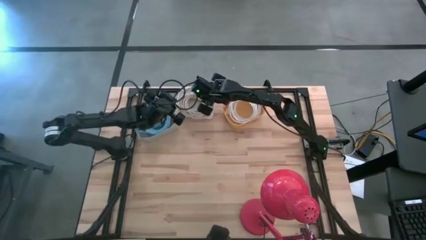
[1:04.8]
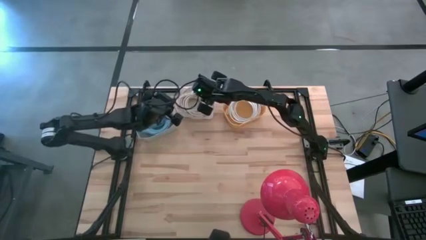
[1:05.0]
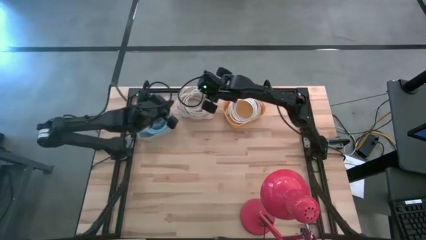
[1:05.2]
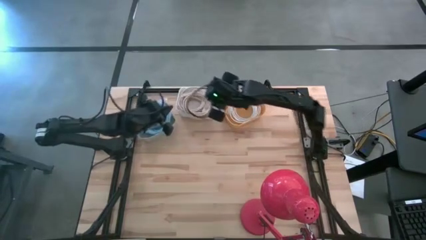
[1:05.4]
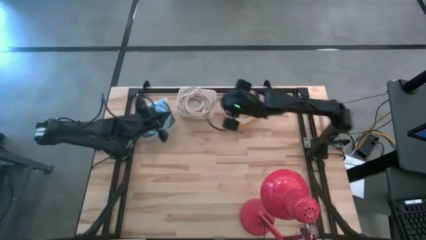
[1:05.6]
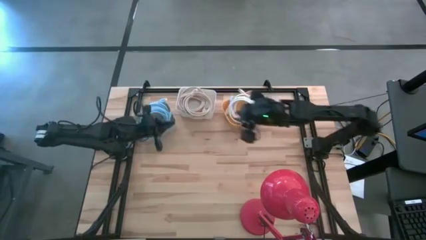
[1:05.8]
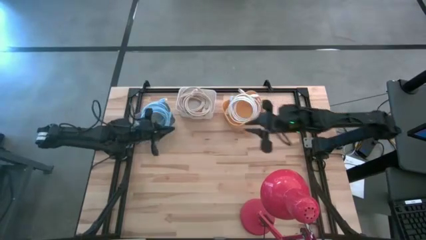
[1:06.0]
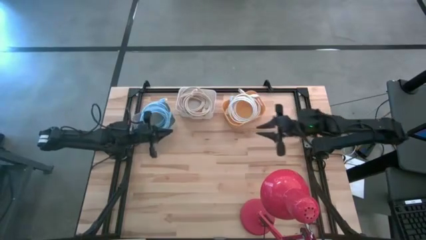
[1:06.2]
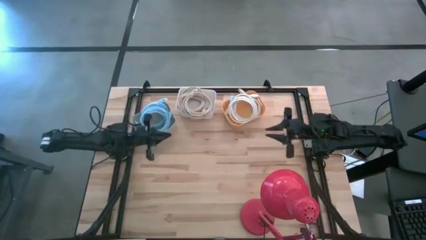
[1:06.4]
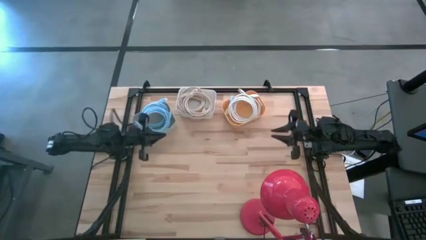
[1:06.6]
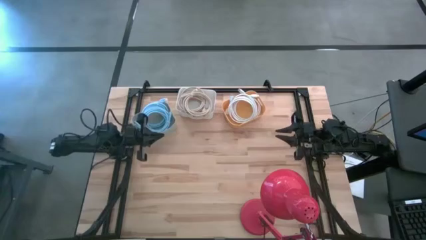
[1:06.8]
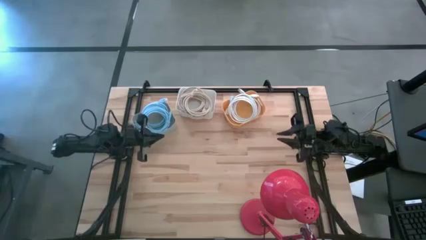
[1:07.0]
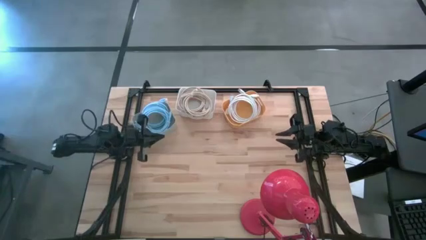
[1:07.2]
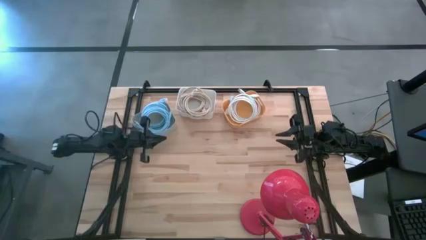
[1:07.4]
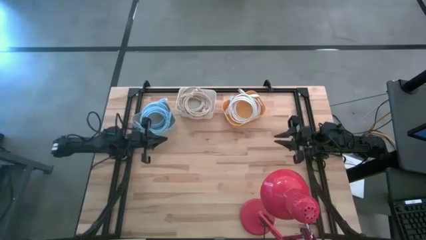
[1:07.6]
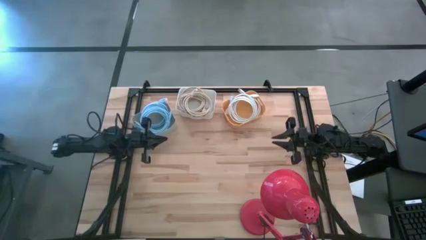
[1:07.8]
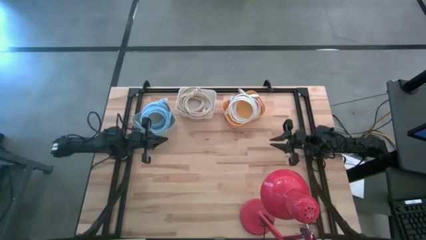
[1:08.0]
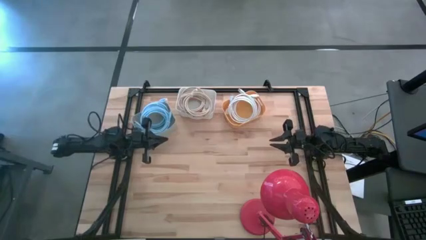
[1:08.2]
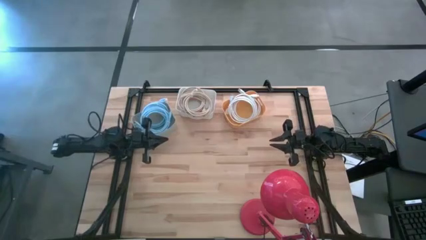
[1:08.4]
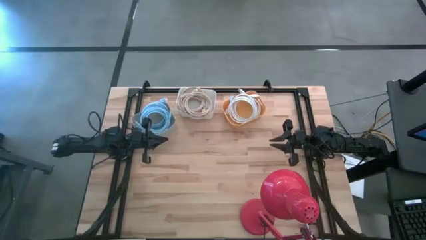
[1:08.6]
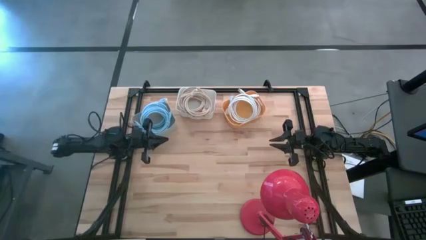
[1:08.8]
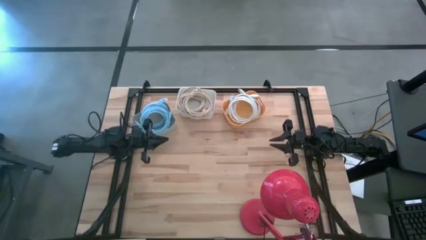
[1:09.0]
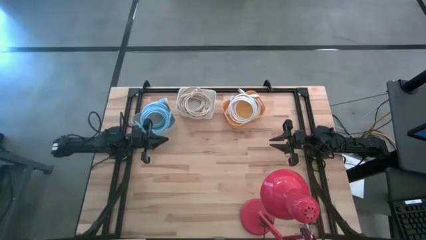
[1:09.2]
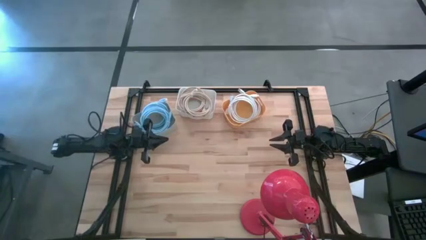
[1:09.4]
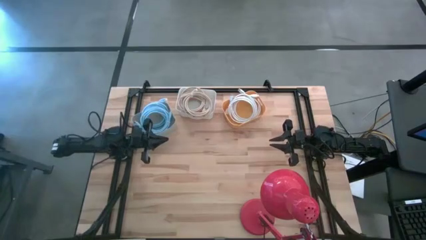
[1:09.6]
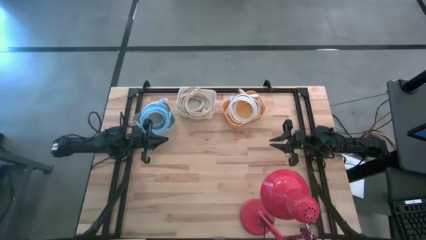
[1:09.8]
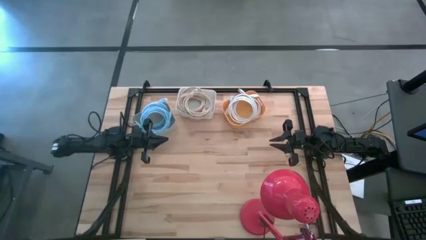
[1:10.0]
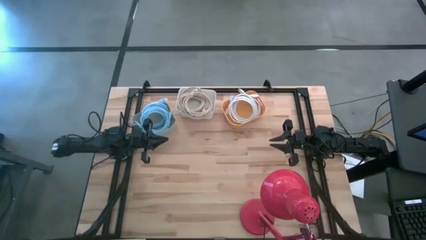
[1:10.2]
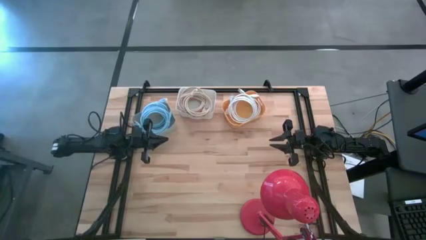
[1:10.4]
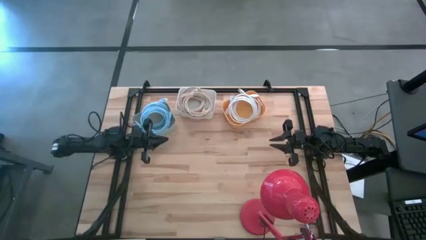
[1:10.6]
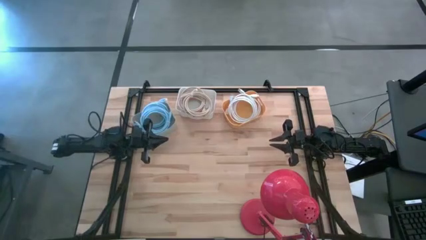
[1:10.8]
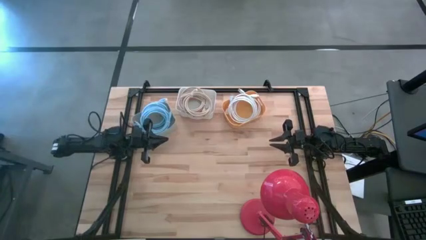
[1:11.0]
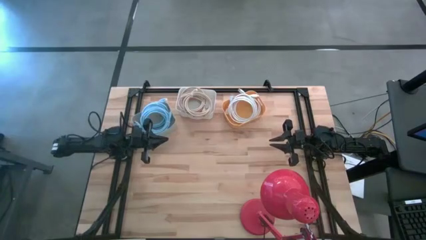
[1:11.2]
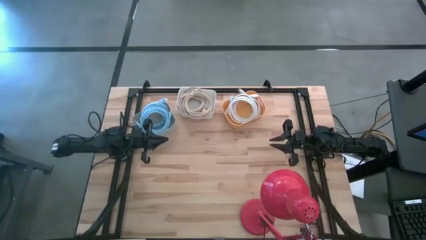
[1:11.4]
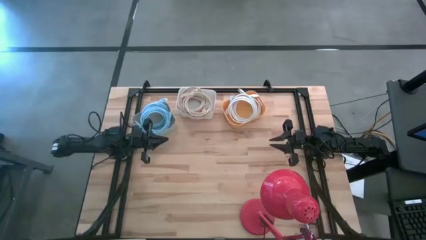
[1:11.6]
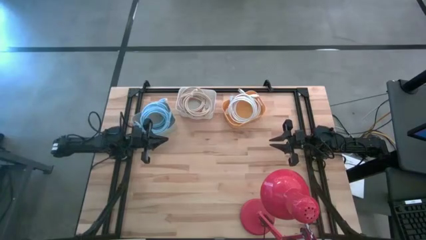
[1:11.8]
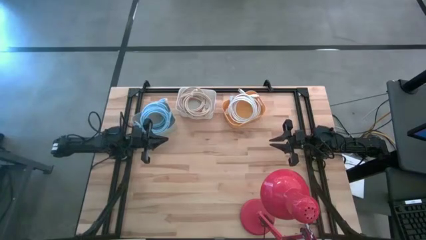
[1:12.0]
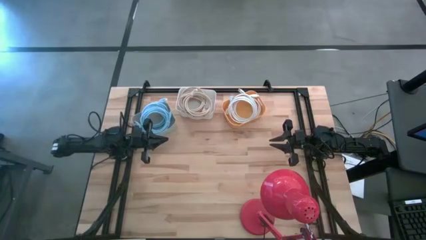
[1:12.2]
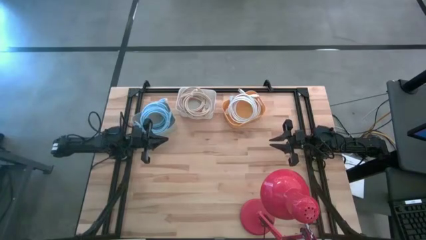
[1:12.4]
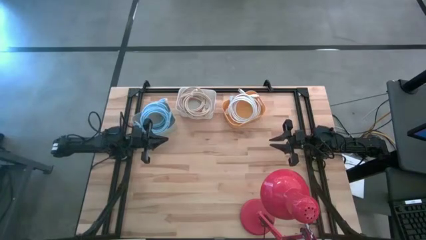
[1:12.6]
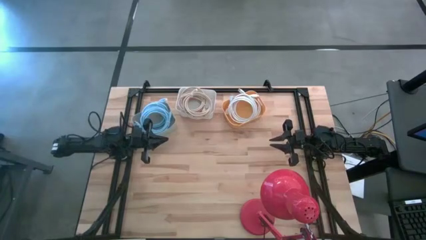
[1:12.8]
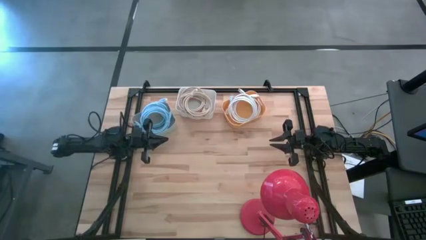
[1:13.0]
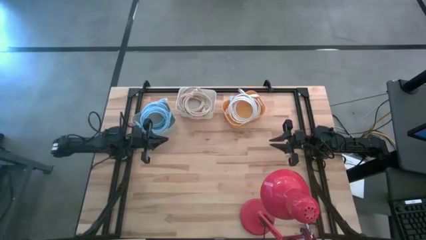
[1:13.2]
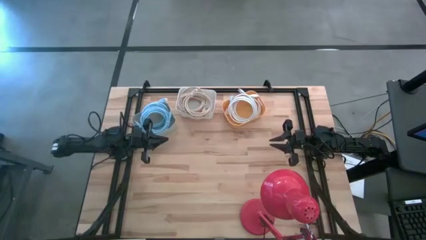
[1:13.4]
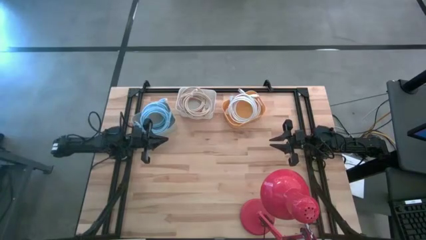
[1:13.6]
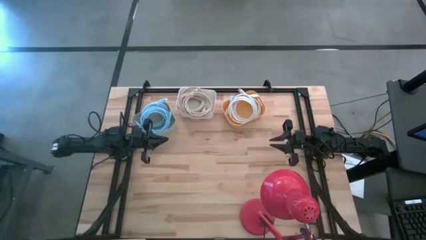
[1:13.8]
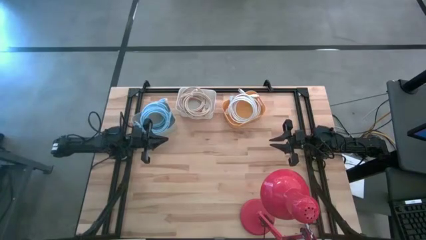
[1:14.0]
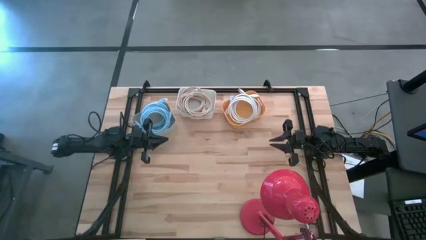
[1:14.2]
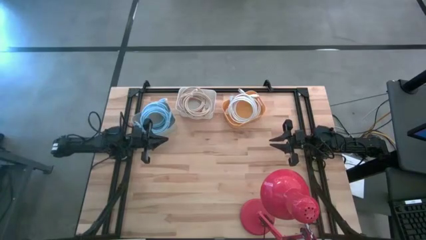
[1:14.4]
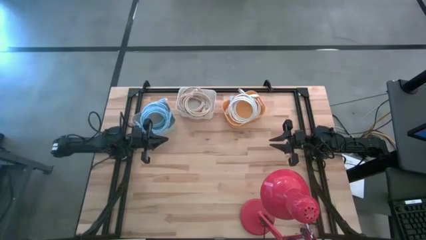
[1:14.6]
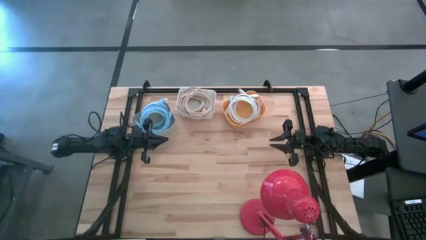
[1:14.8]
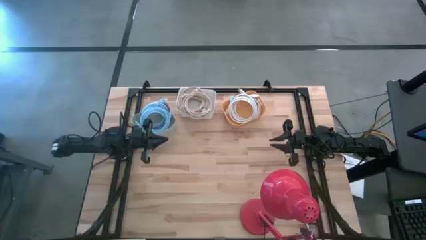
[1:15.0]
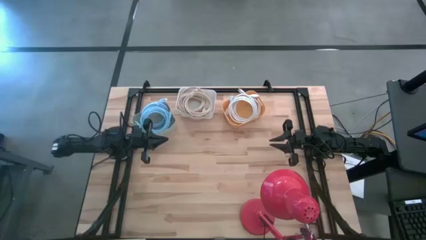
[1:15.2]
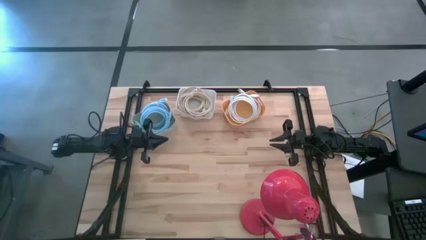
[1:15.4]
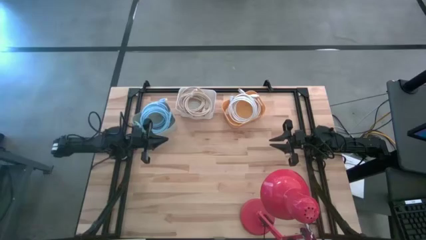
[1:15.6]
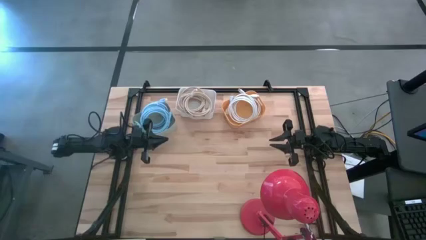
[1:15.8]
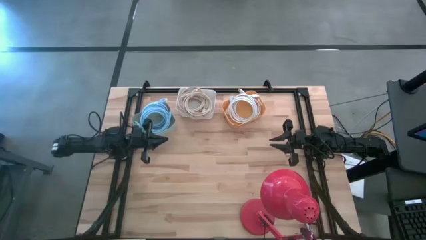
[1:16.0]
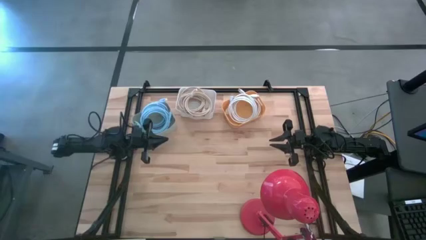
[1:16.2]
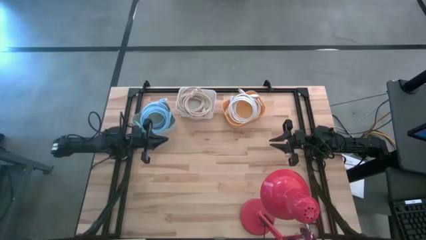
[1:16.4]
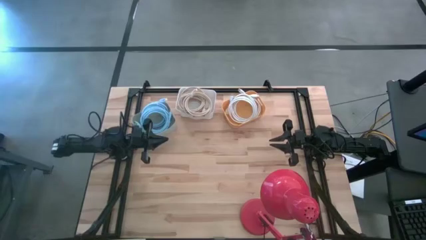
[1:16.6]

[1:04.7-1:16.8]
Task: Pick & Place USB Port
Return to Home Position
